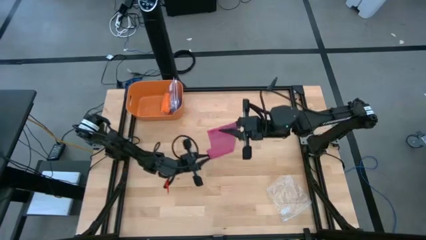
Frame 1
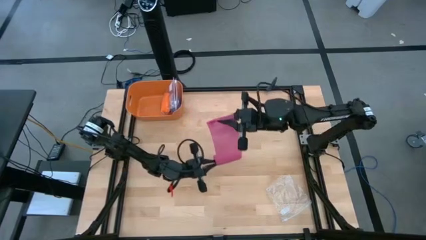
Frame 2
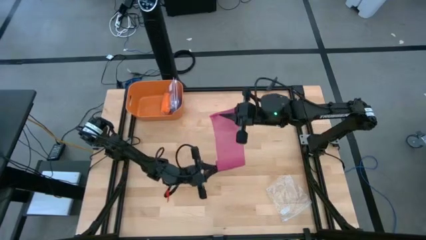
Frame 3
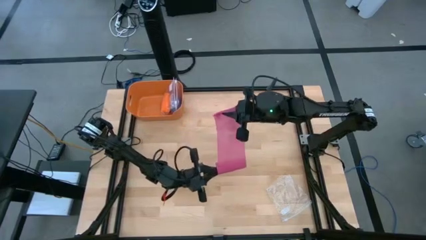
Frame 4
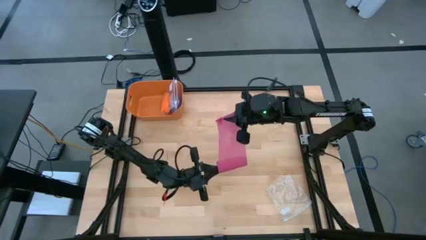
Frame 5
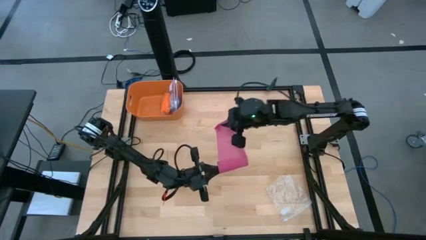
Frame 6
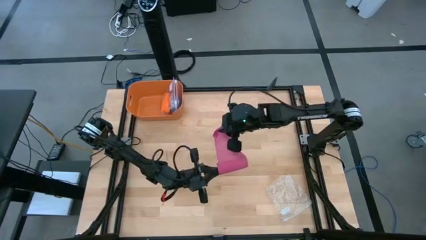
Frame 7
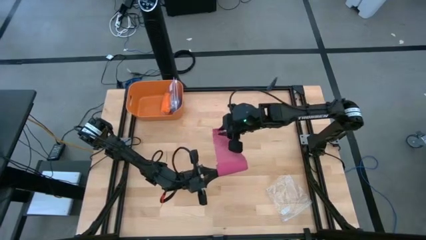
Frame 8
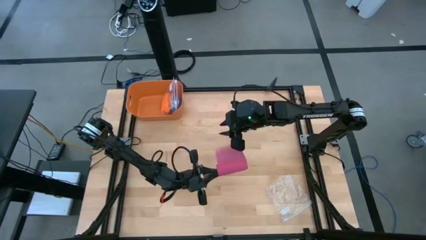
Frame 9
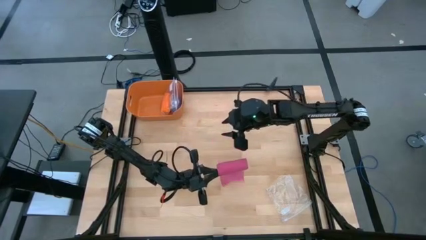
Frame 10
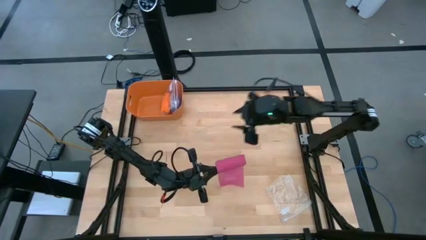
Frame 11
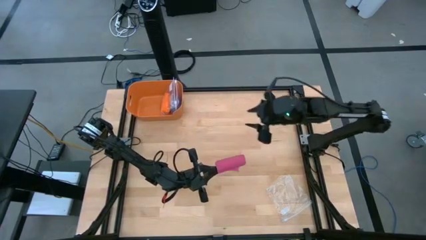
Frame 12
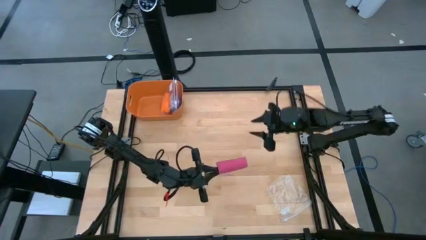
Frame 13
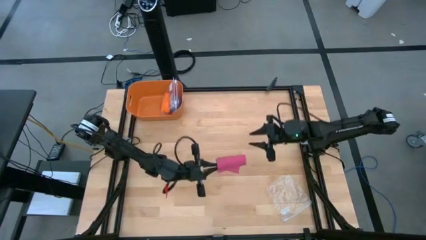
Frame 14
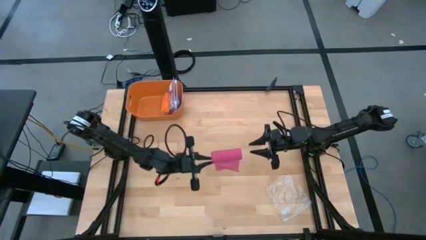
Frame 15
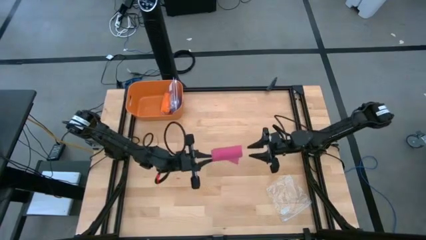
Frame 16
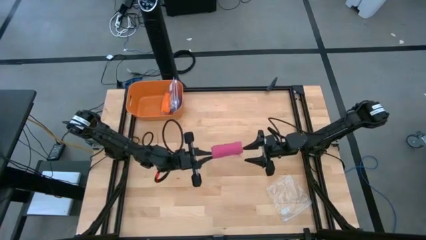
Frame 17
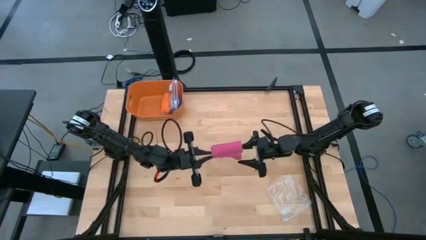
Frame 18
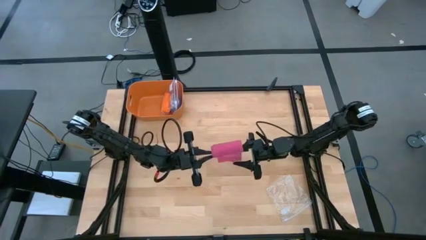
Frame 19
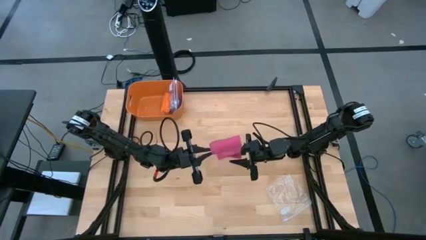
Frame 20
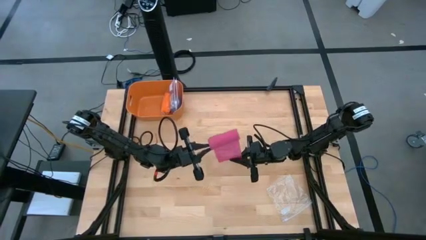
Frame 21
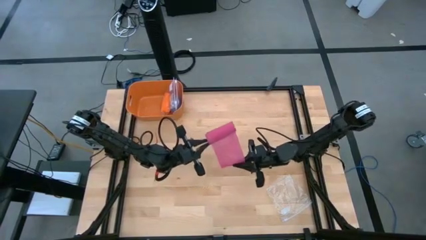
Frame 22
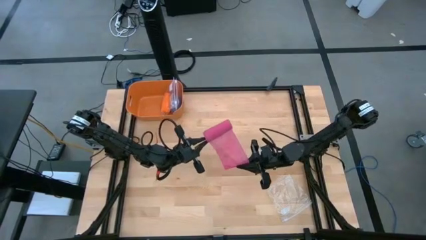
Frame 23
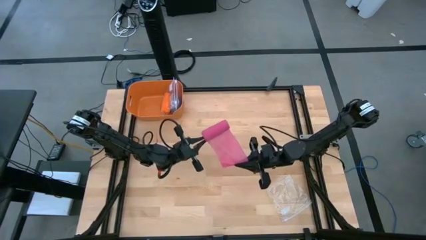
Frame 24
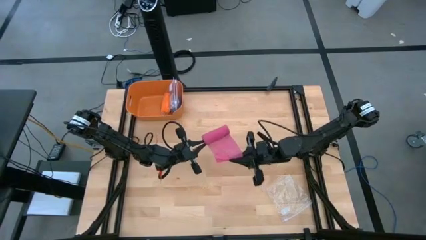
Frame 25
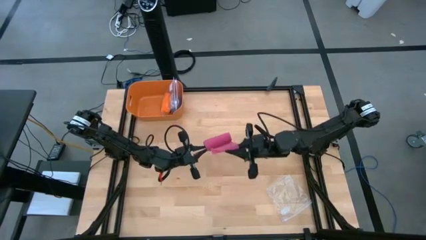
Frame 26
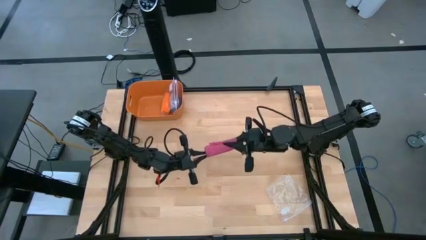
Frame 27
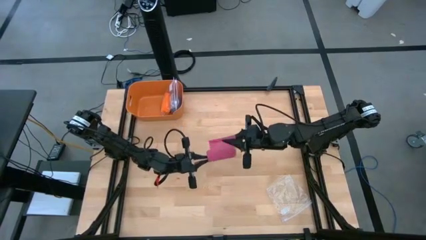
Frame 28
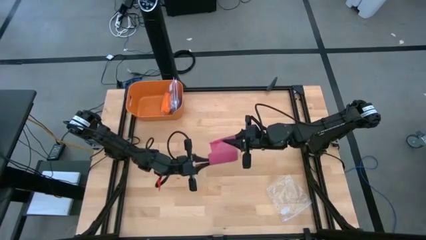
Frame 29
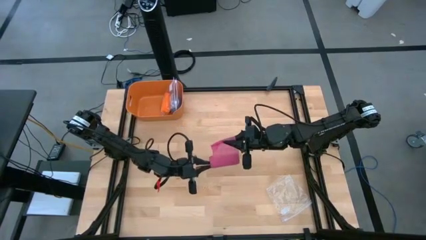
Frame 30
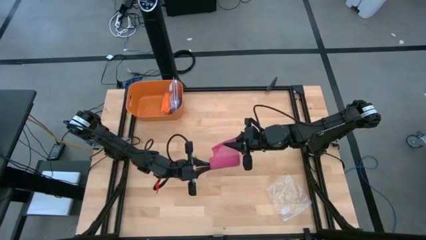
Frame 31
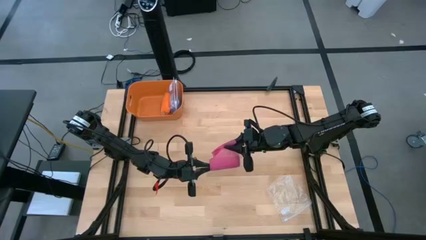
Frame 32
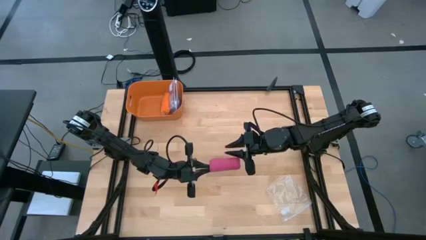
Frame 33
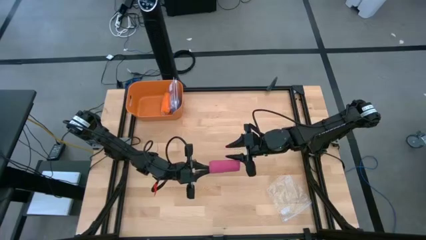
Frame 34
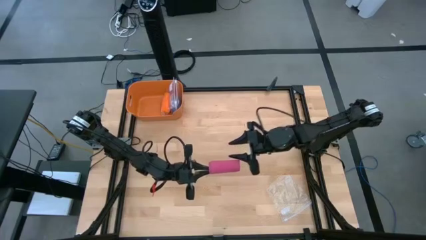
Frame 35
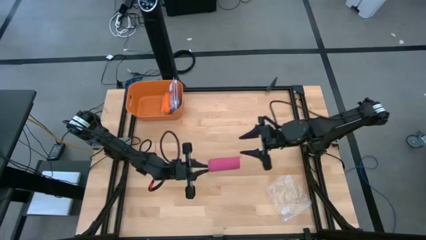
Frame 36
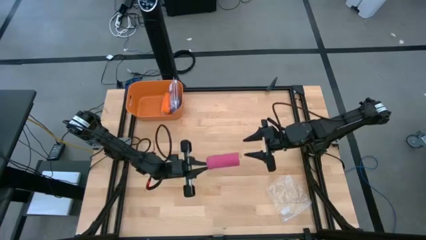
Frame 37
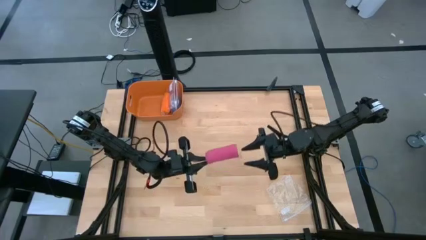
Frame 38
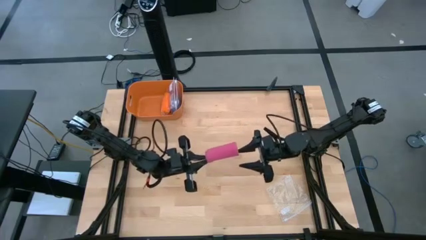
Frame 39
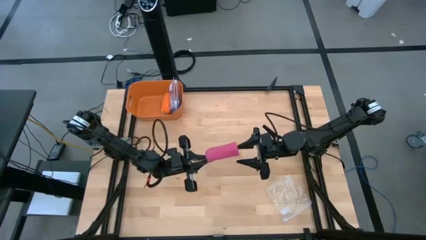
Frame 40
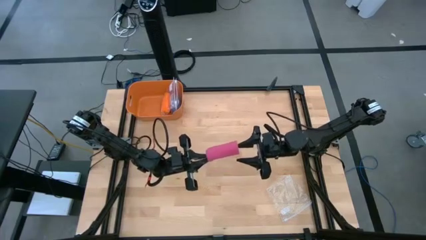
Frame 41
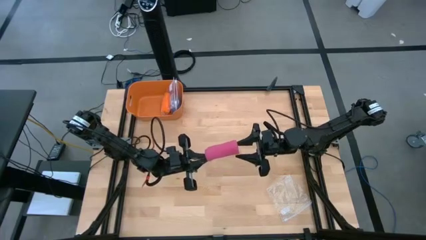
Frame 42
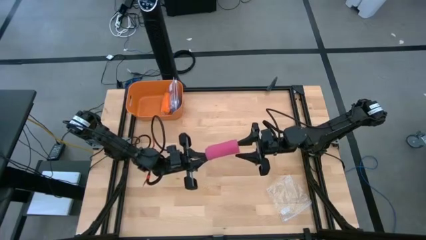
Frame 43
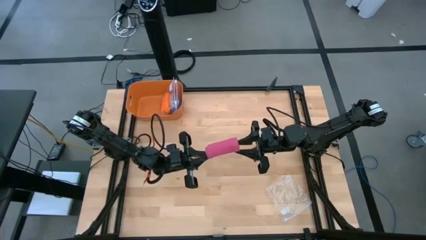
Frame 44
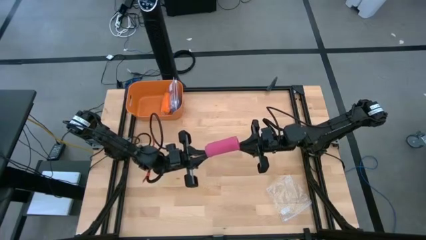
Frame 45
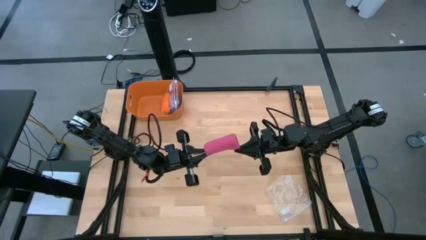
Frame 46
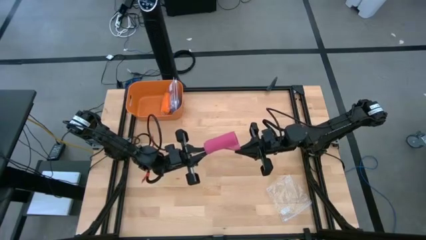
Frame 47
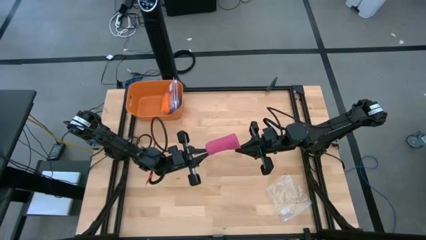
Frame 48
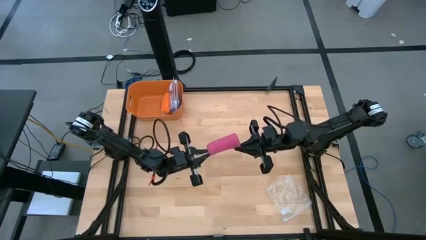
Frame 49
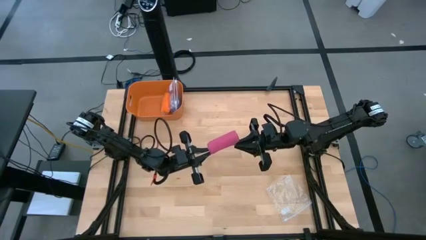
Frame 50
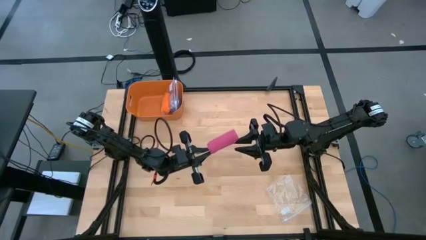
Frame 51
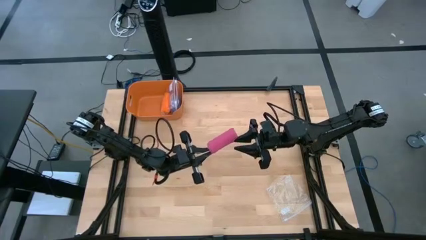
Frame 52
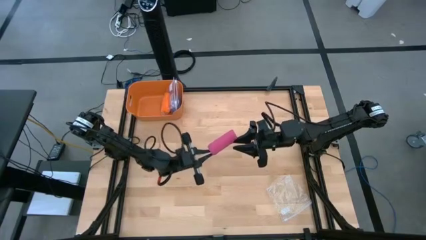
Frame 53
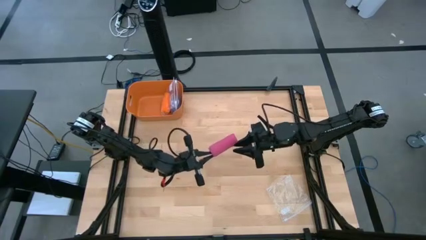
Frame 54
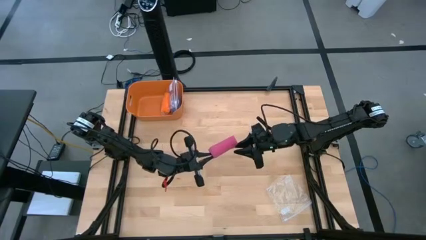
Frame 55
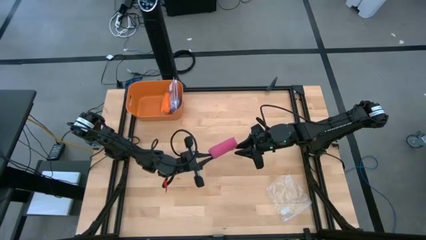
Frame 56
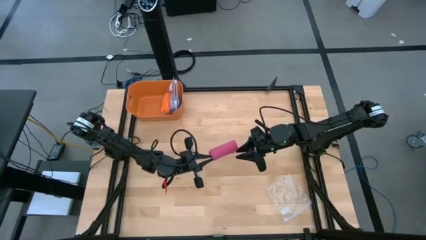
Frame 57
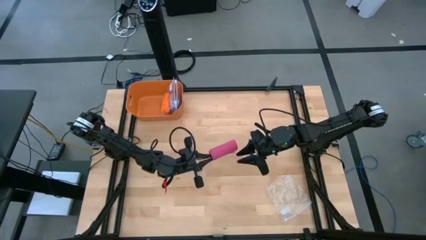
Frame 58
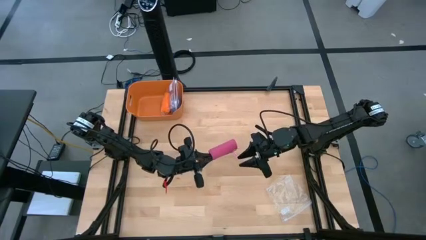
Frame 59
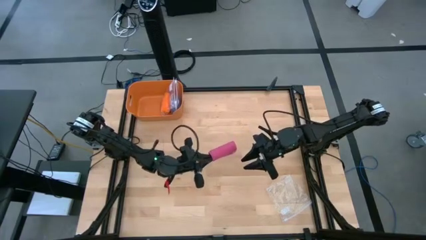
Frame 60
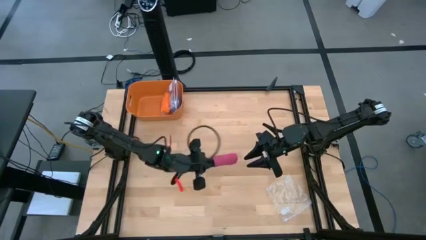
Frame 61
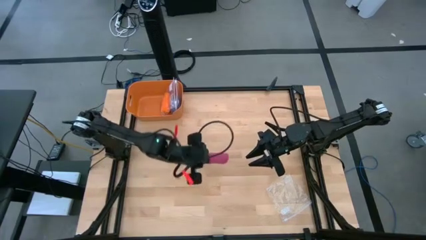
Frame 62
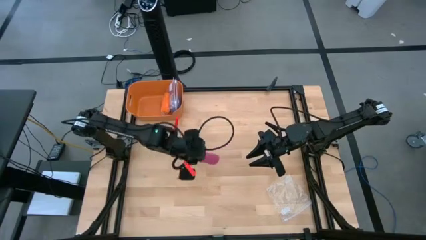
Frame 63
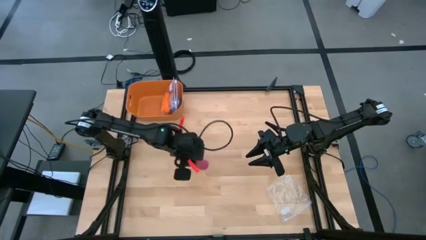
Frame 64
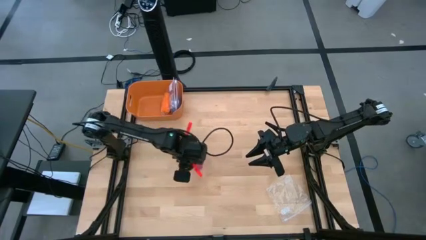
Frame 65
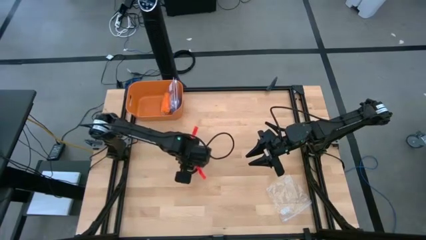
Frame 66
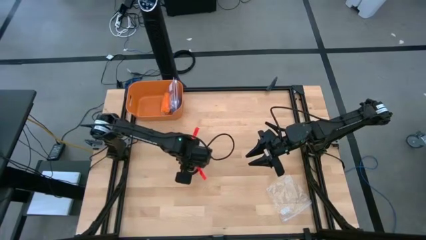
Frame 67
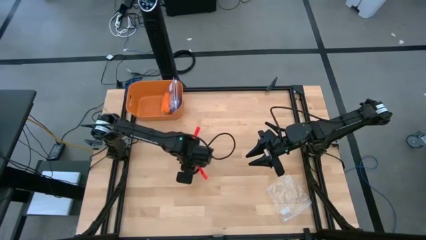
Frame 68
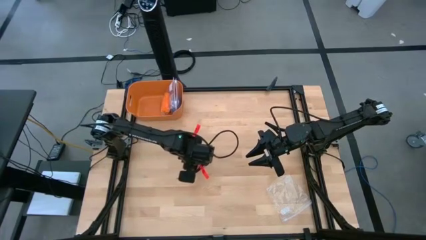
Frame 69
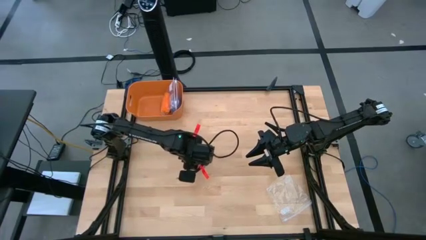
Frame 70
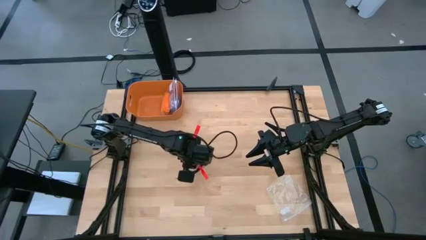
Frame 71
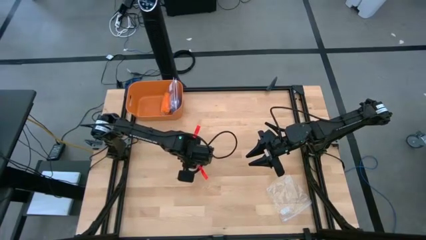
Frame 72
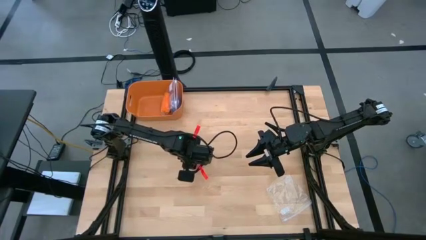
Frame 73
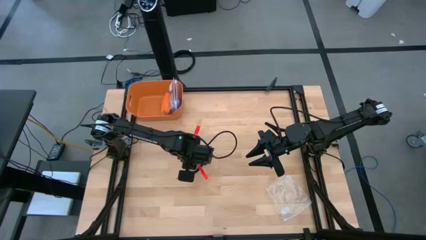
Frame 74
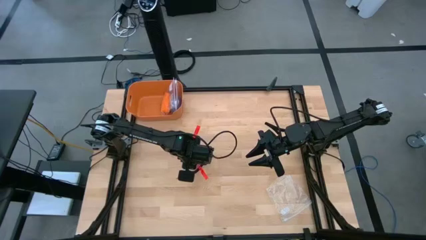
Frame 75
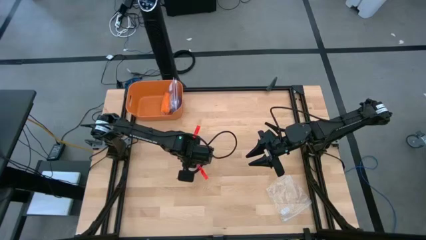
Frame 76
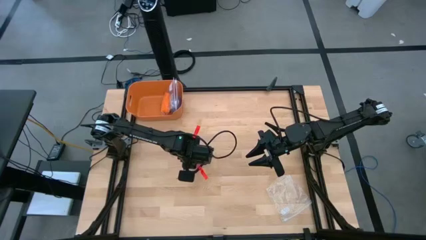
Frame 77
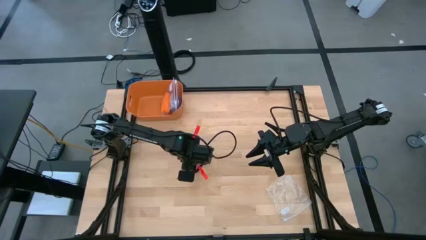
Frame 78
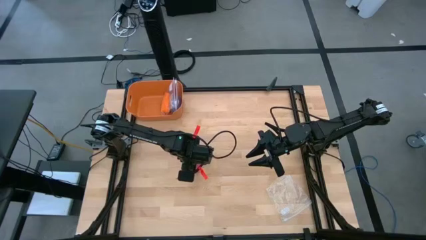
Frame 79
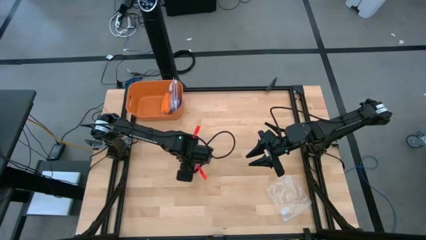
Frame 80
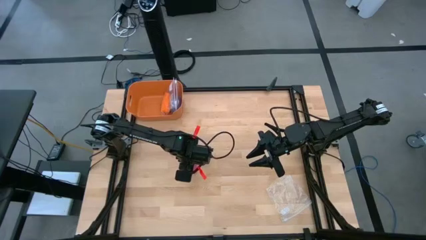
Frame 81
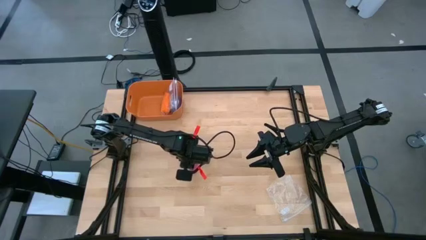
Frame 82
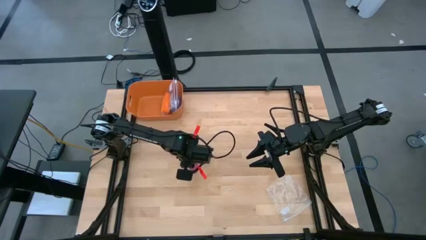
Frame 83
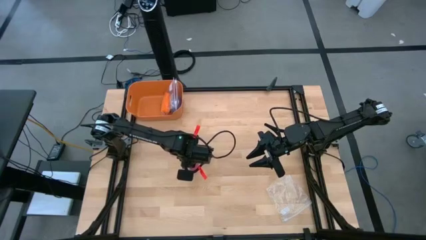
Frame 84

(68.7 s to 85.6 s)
Task: Roll bandage
Roll the pink bandage
